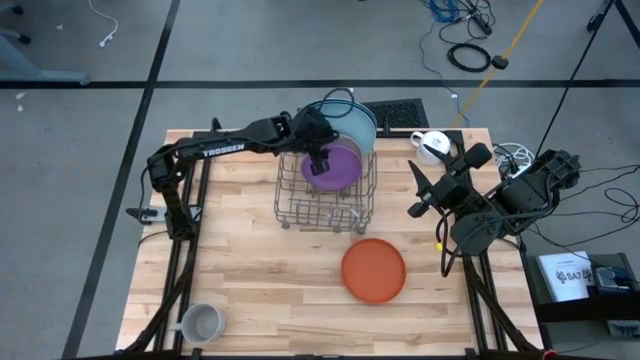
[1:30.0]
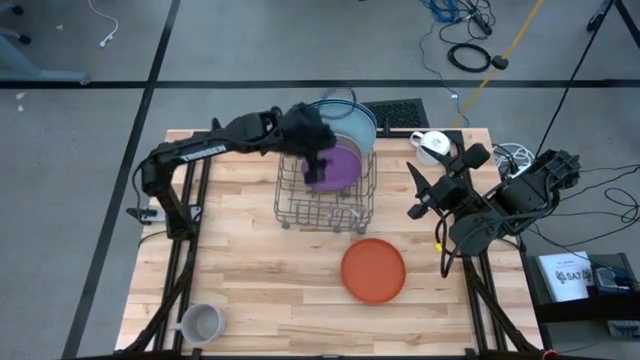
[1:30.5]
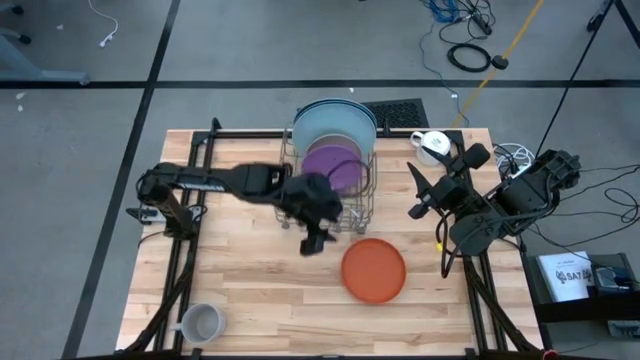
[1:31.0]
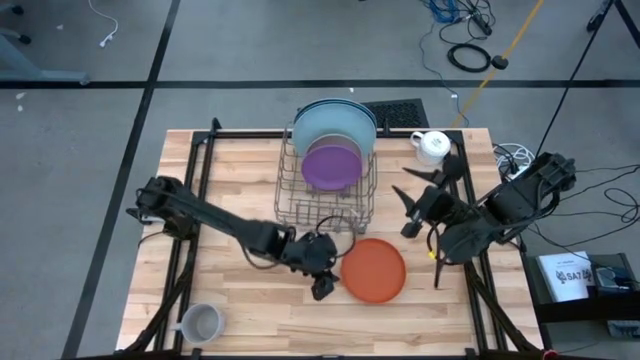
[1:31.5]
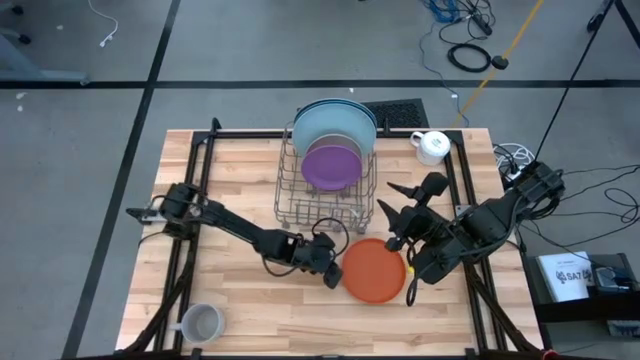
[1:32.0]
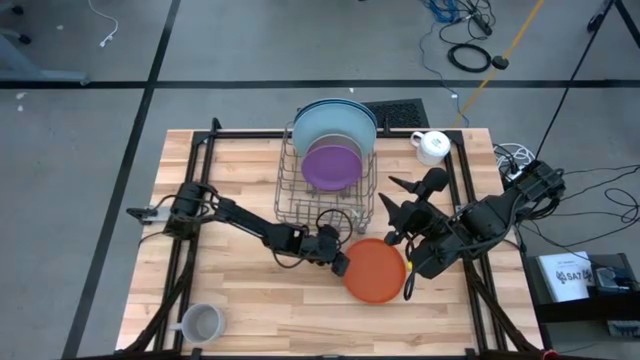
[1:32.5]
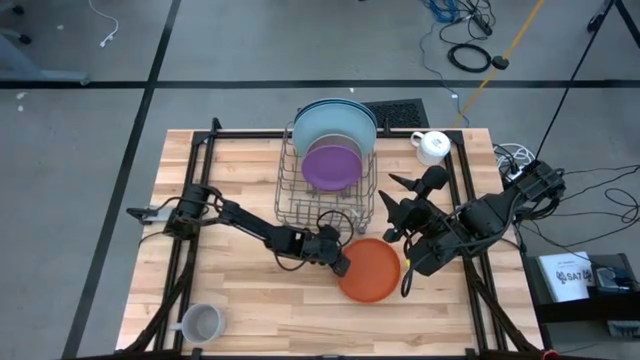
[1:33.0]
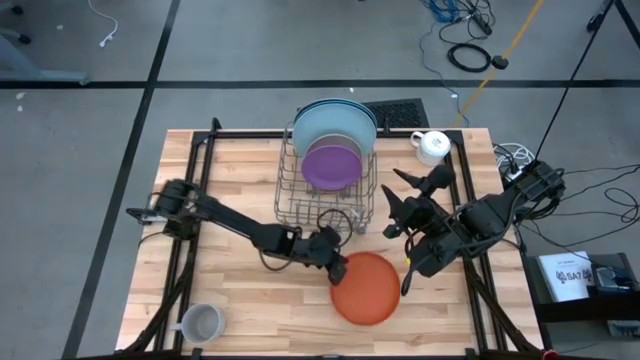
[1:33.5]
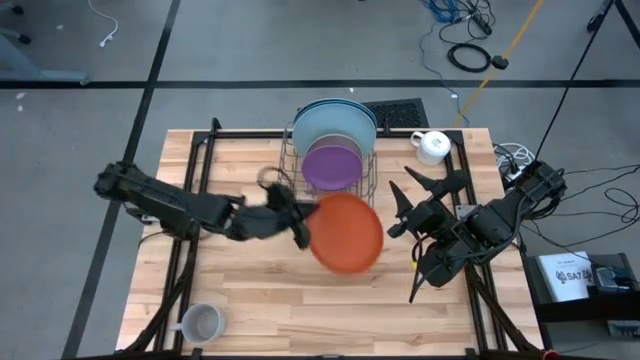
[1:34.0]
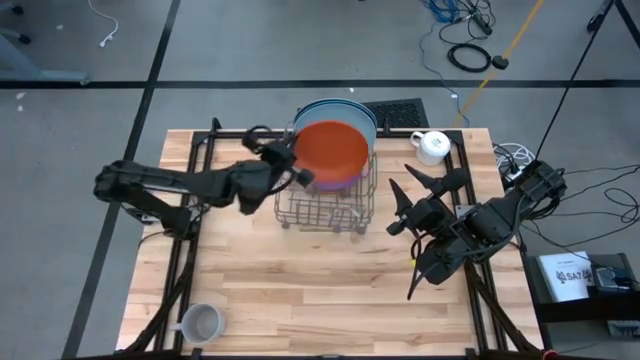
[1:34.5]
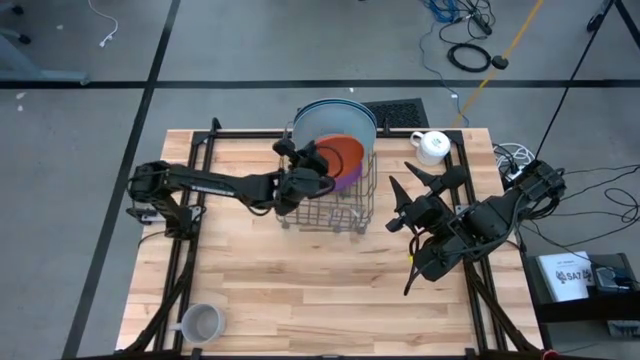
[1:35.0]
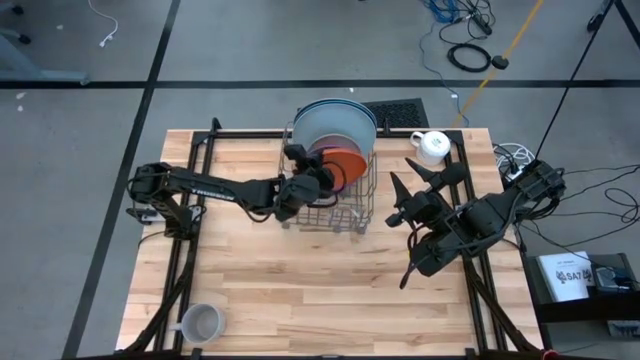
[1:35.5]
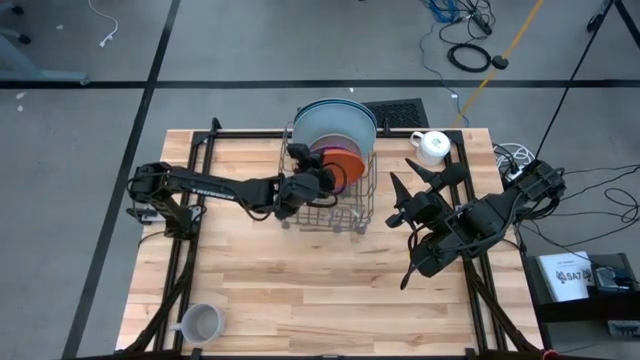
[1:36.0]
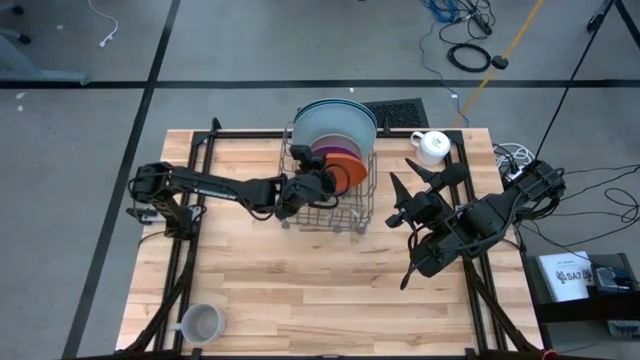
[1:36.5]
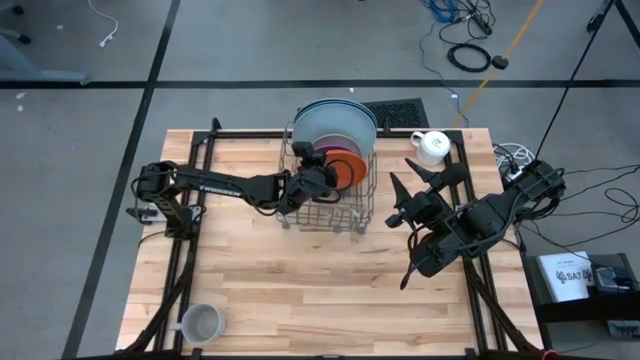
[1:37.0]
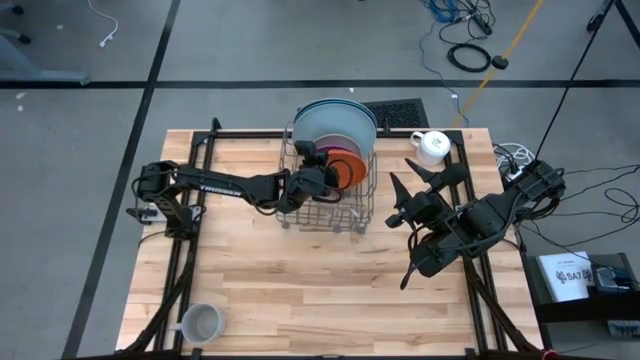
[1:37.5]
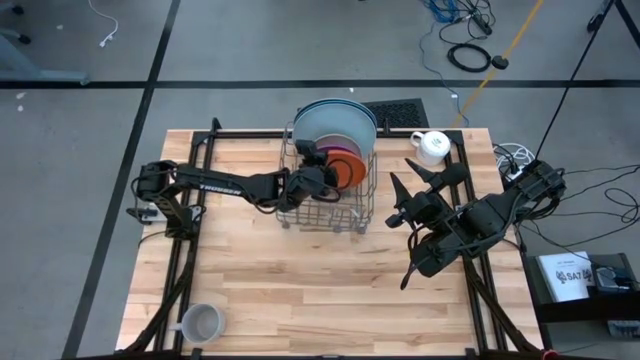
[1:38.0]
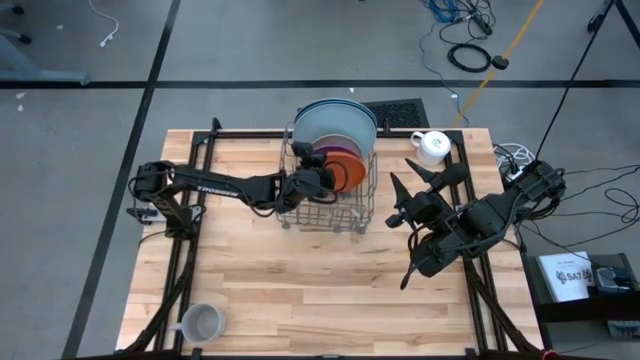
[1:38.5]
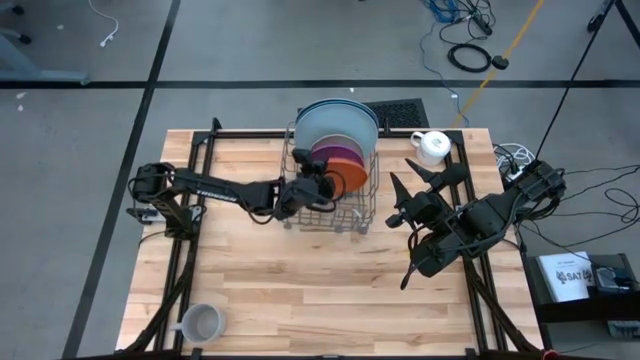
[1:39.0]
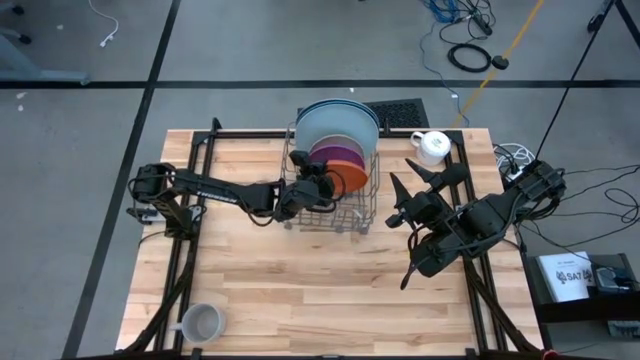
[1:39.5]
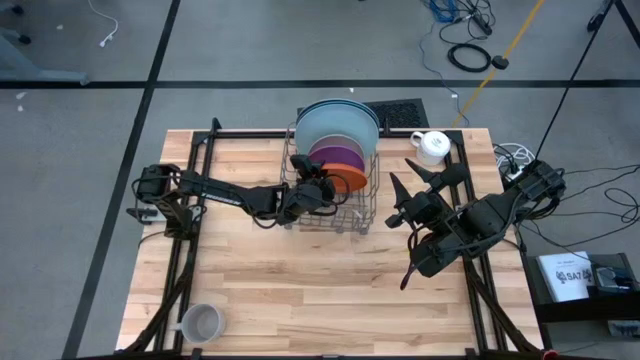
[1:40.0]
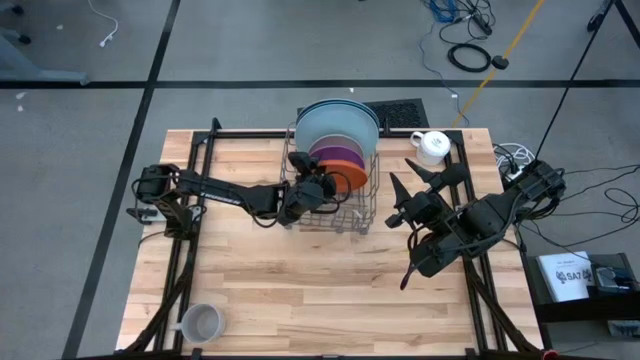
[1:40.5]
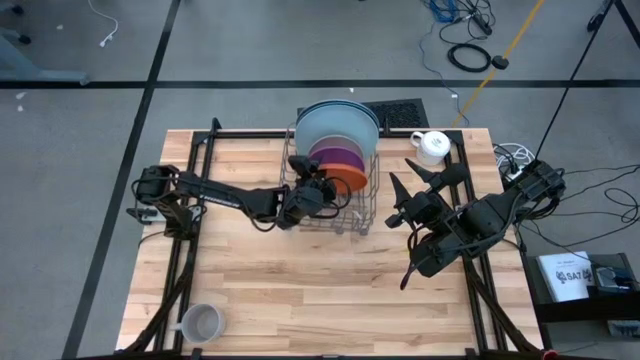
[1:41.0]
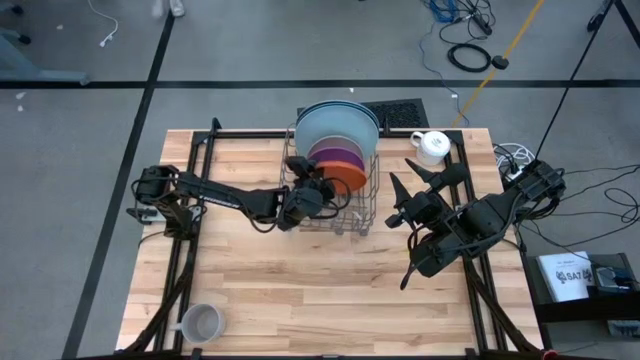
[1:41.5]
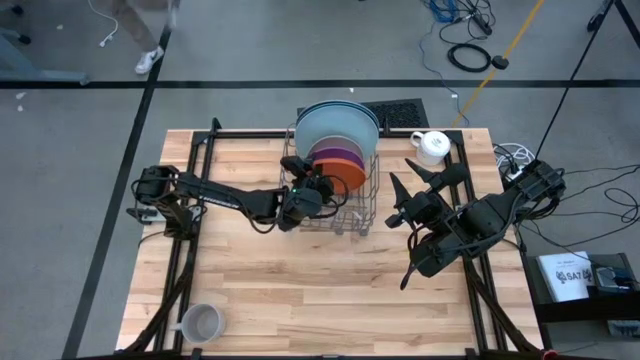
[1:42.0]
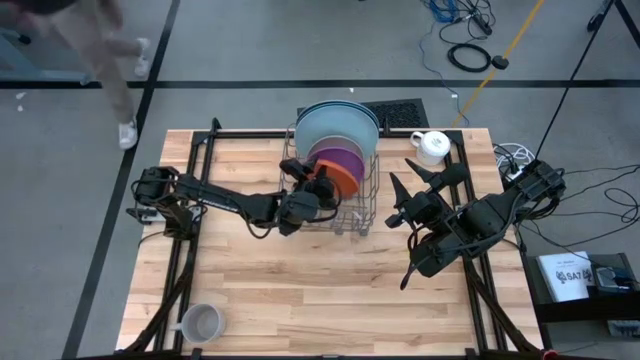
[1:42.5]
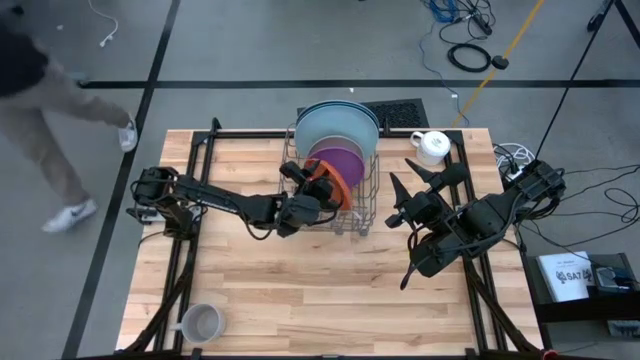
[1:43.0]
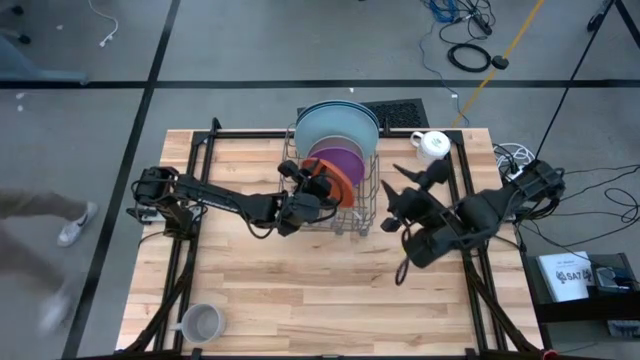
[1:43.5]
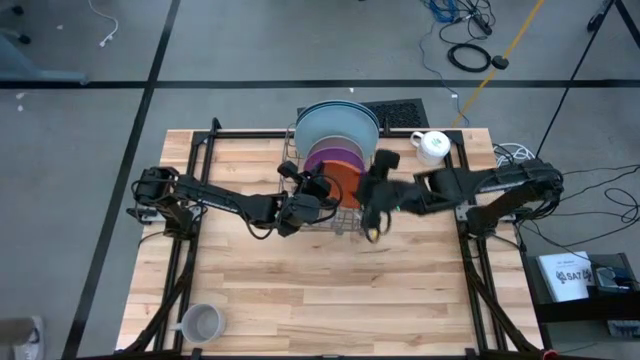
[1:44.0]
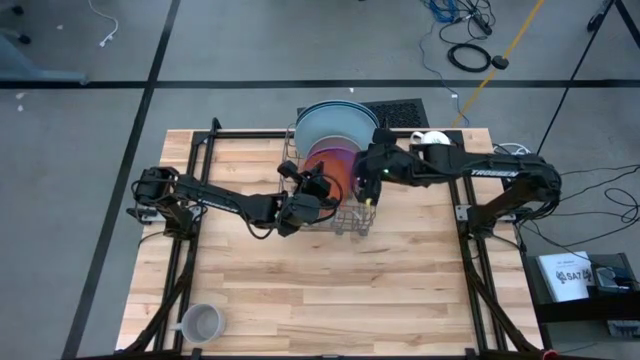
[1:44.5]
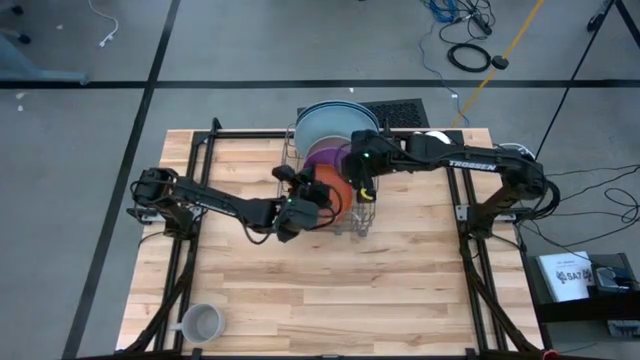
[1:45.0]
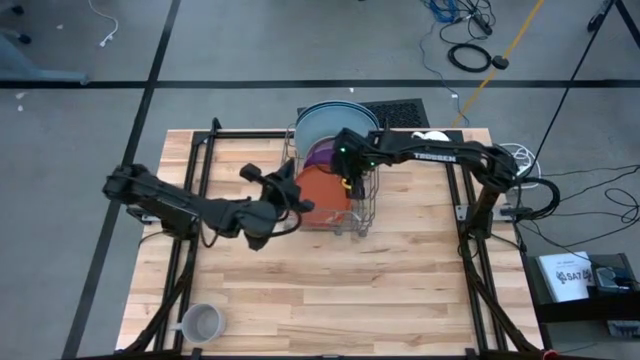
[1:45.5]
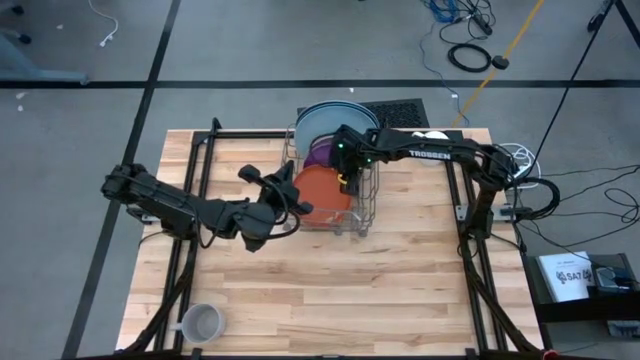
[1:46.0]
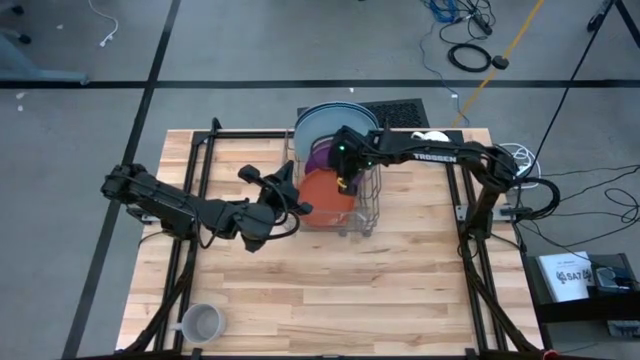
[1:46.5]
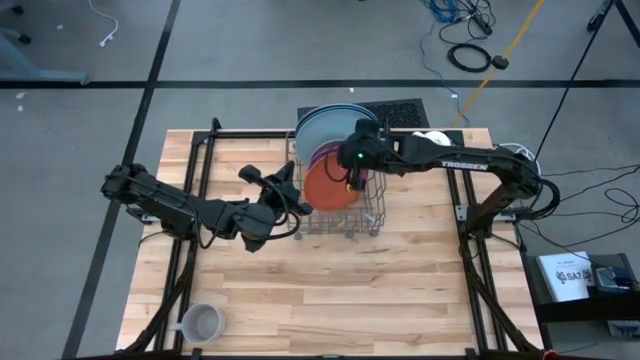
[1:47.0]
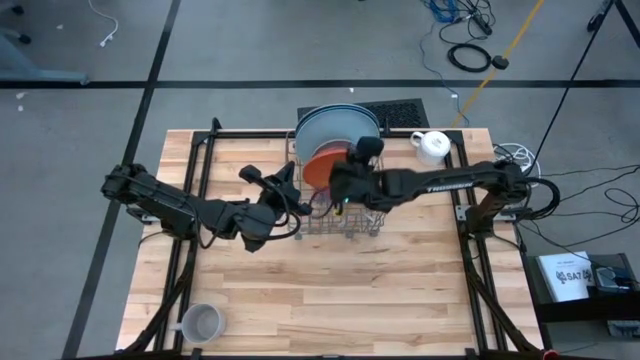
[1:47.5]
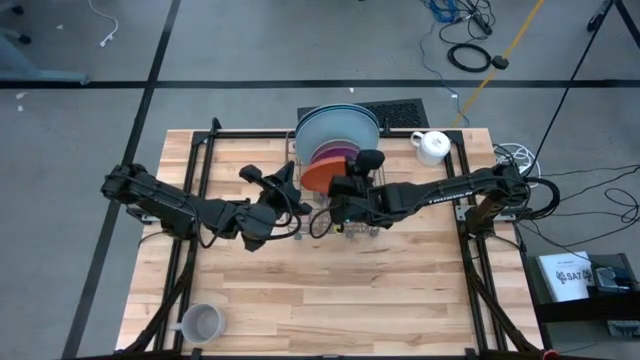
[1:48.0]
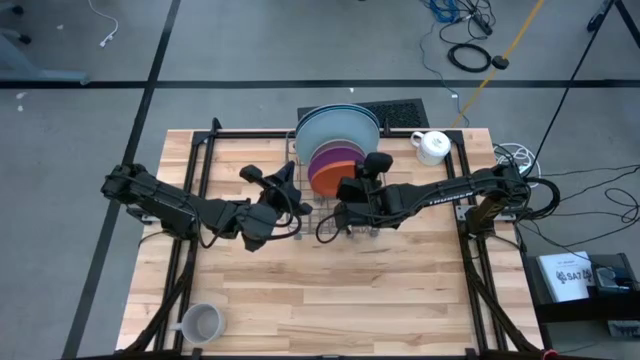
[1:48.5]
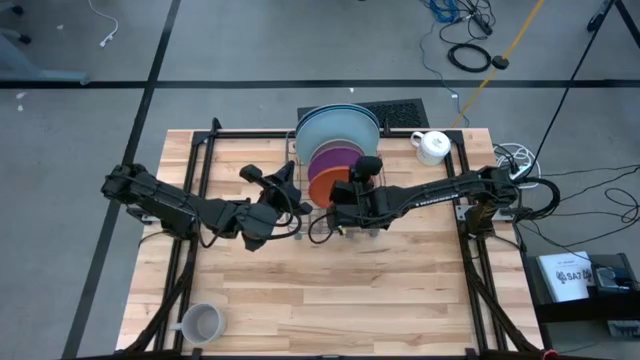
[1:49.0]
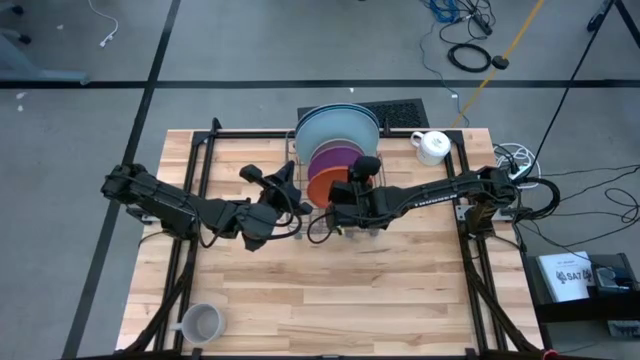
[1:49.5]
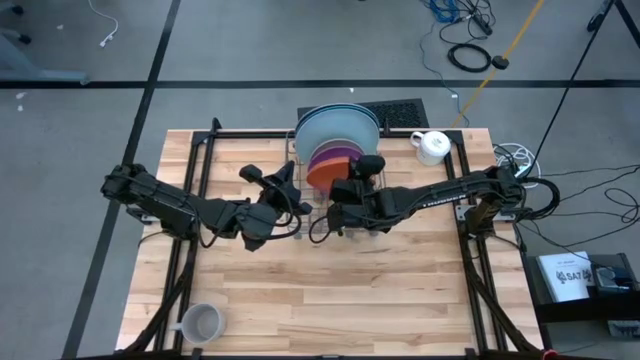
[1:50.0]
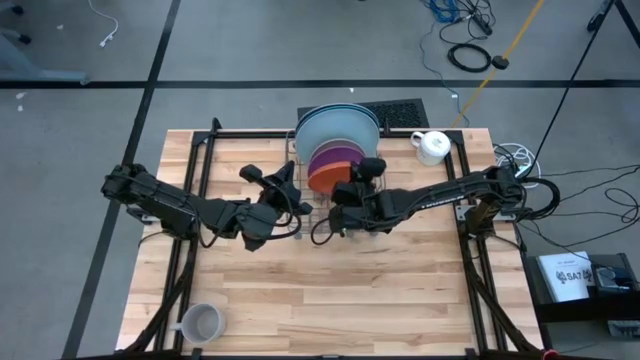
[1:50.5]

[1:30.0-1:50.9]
Task: Sort dishes
Put the orange plate into the dish rack

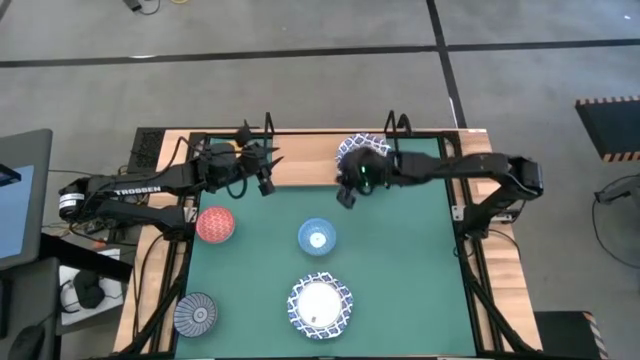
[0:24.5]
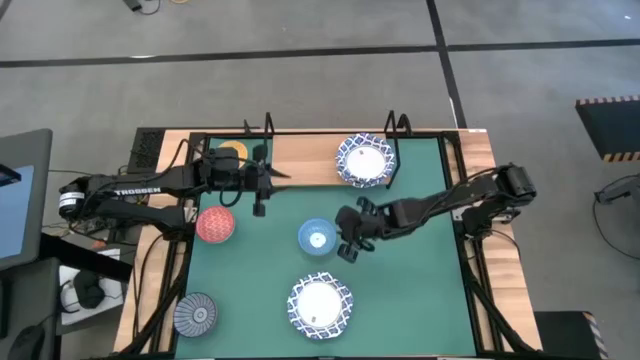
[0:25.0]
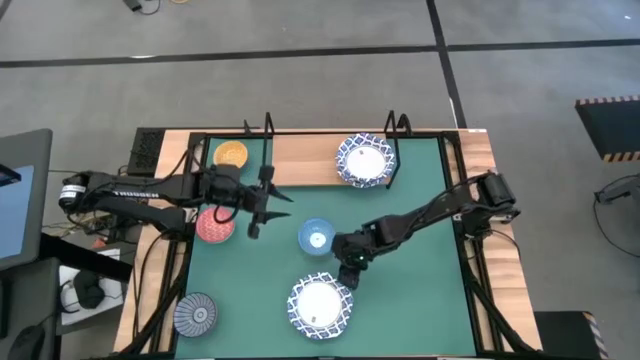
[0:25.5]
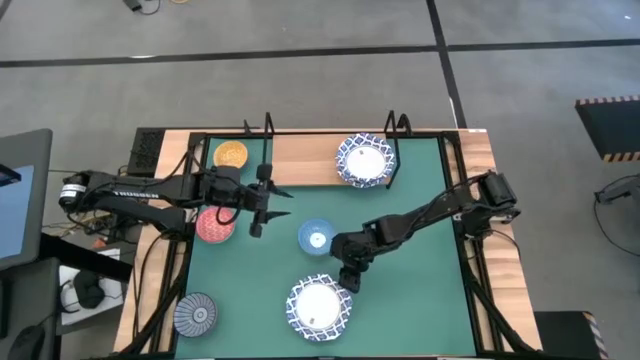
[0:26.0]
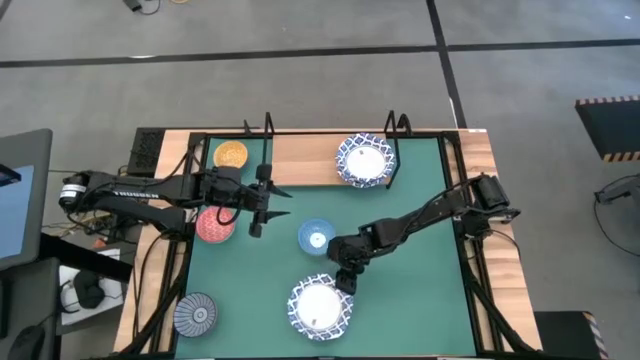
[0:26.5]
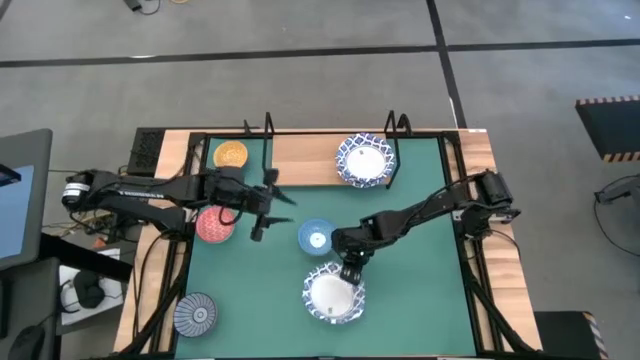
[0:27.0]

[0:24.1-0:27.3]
Task: Place and stack bowls onto a shelf
Stack the white patterned bowl on top of the white patterned bowl on the shelf
